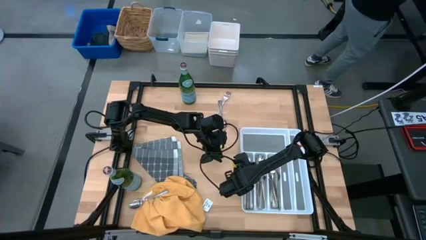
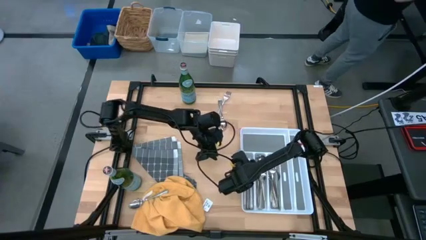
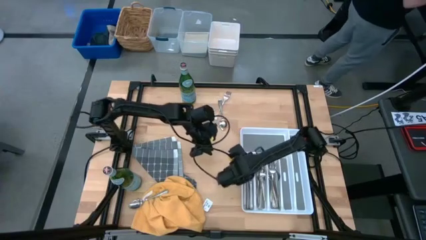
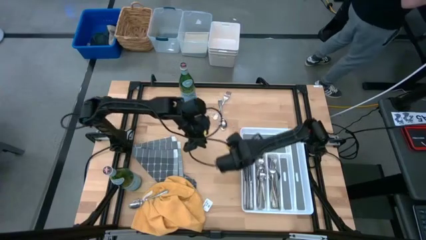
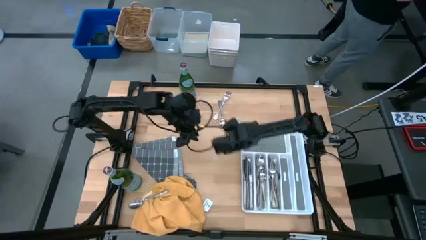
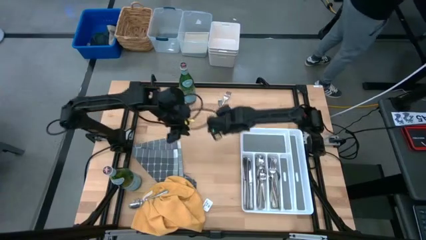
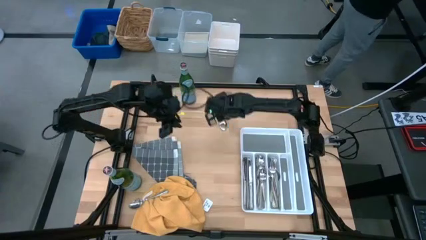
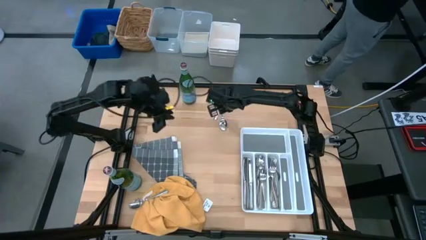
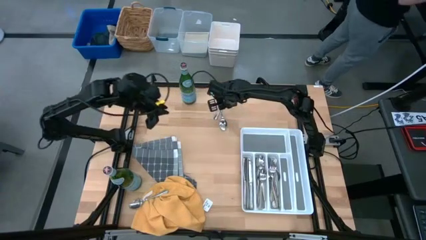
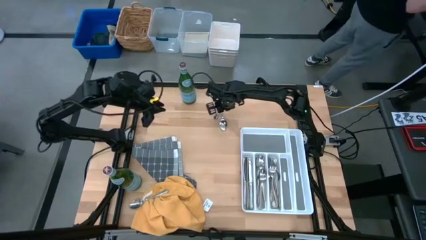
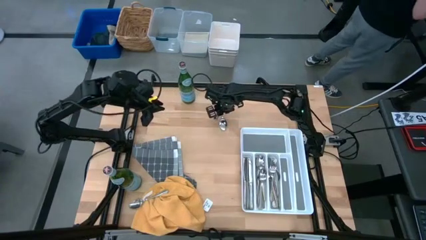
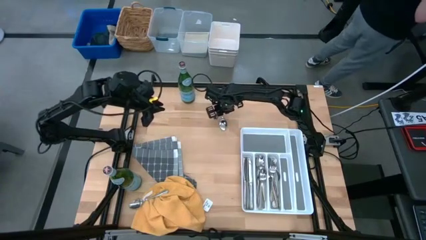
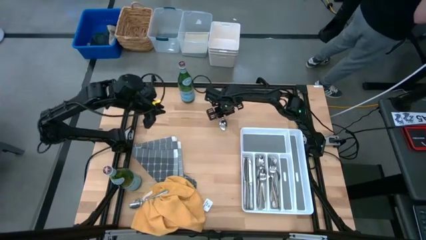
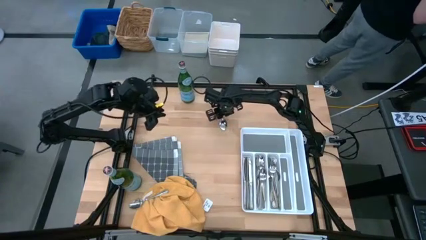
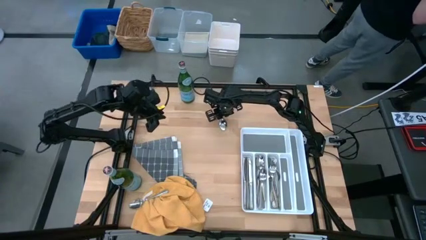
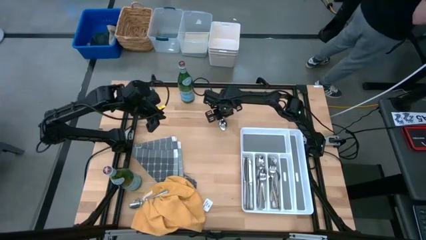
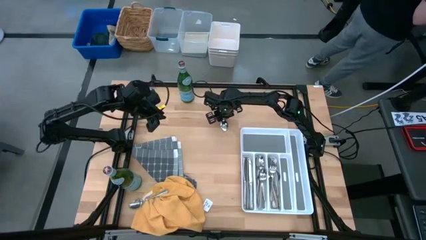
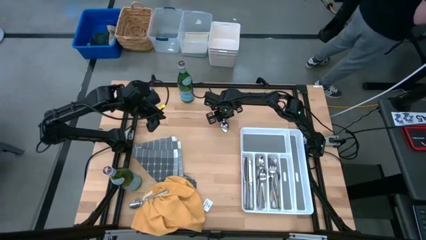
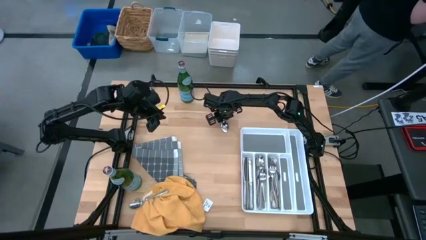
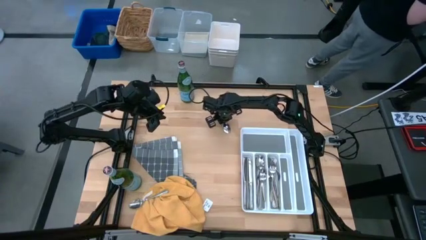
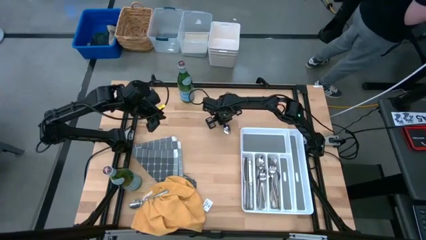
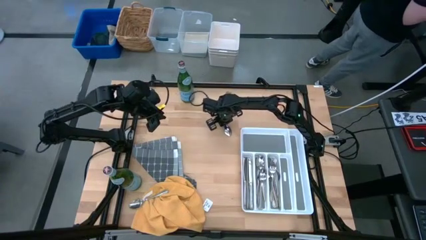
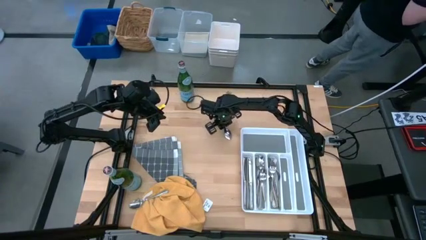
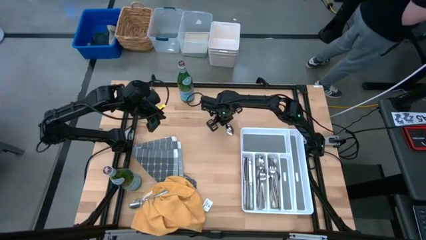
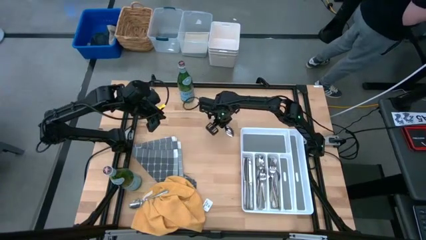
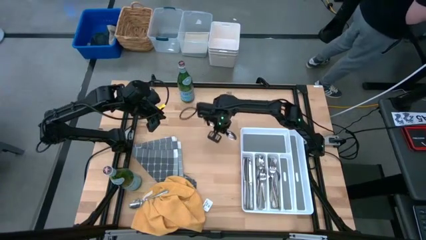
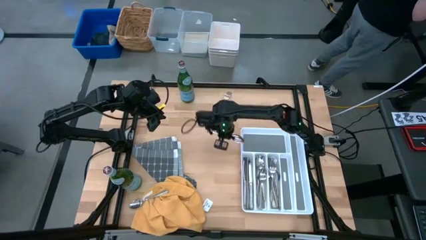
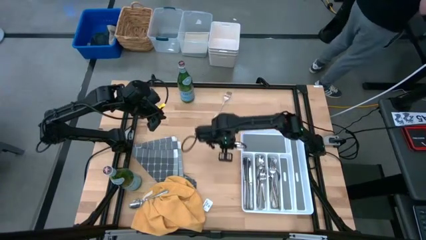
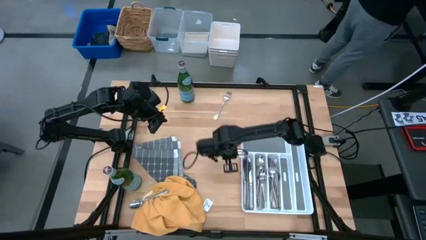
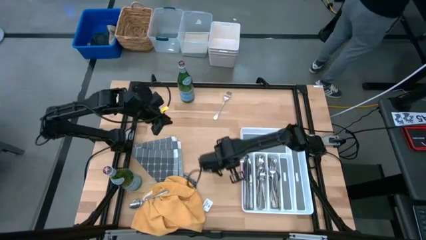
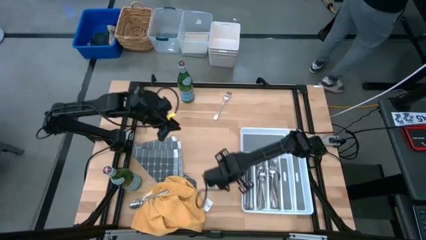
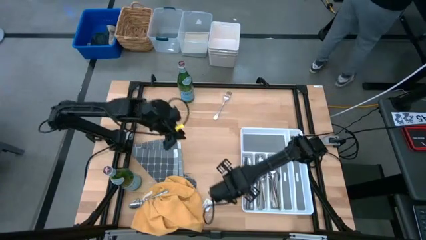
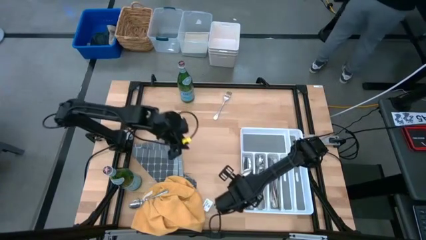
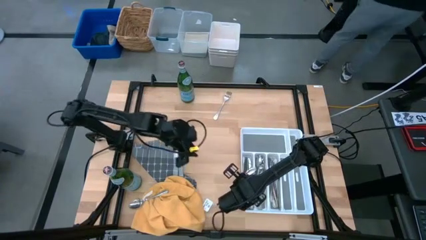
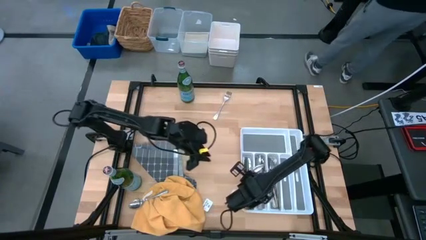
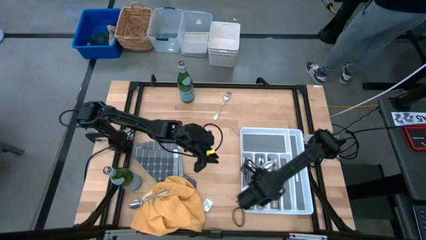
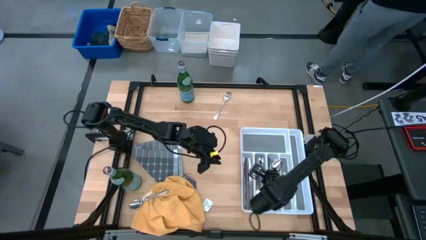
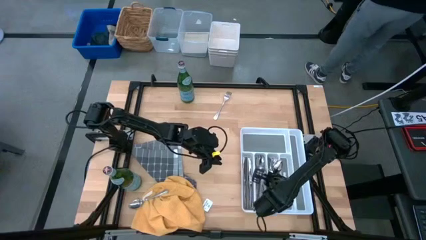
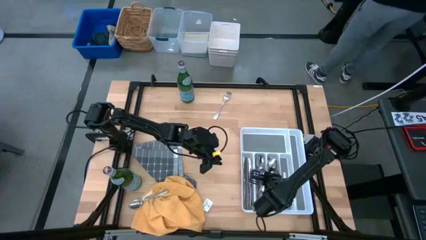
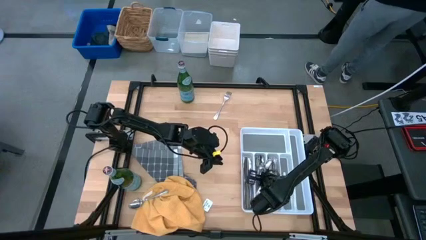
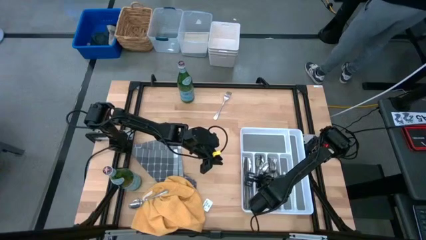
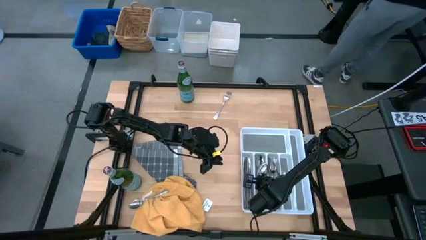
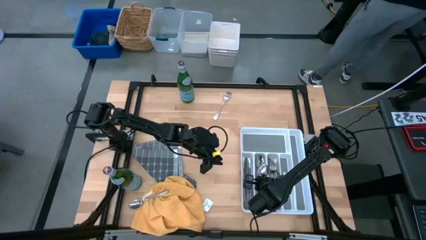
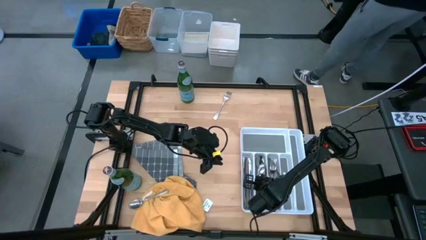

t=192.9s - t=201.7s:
Stack the silver spoon into the white utensil tray with the other silver spoons
